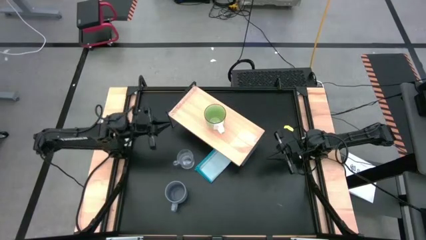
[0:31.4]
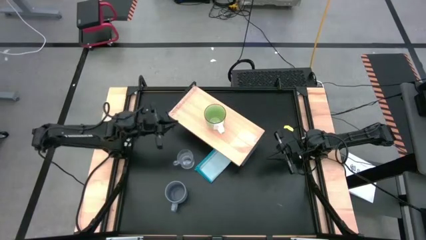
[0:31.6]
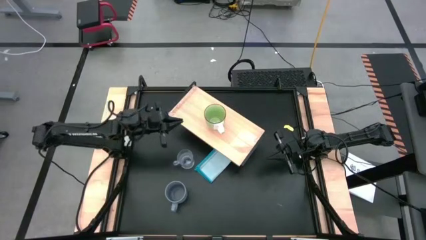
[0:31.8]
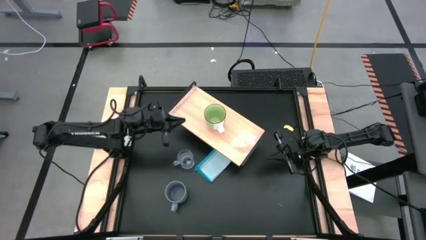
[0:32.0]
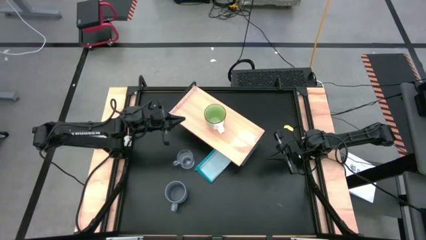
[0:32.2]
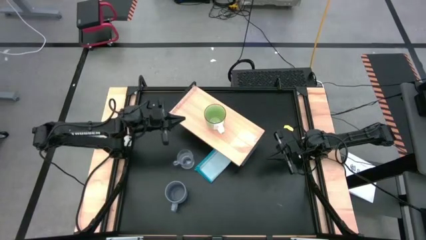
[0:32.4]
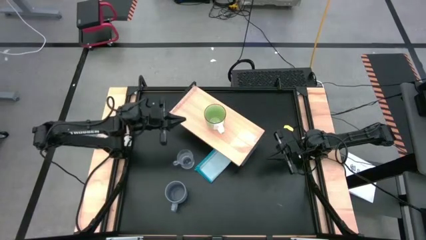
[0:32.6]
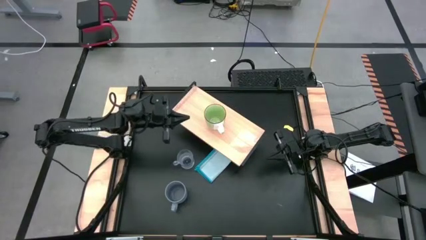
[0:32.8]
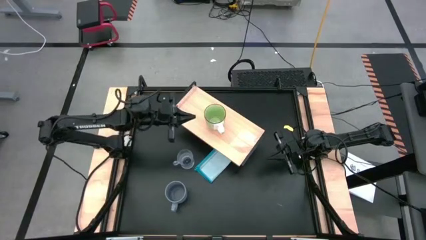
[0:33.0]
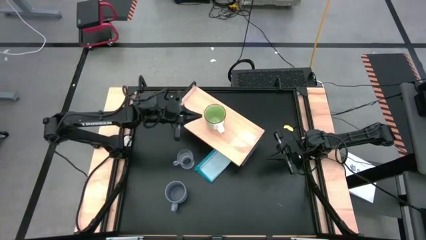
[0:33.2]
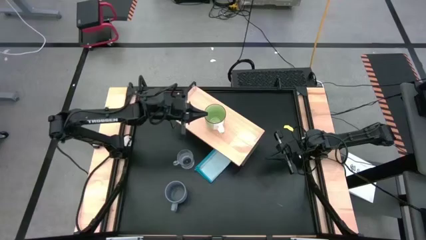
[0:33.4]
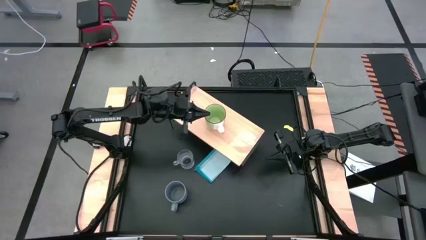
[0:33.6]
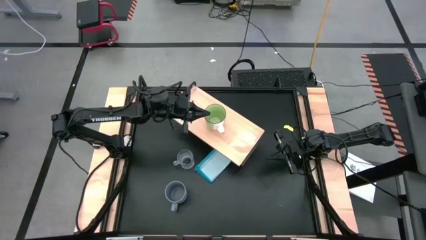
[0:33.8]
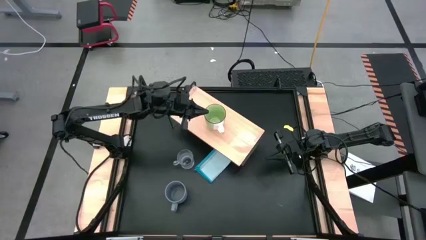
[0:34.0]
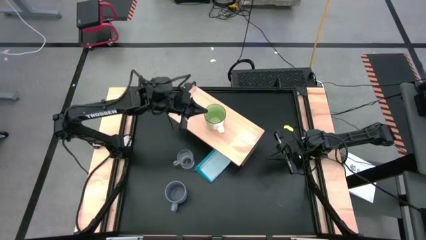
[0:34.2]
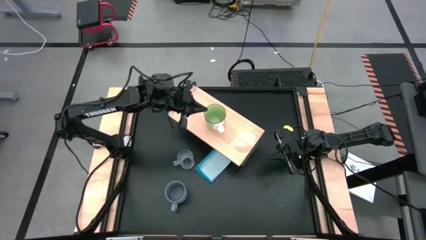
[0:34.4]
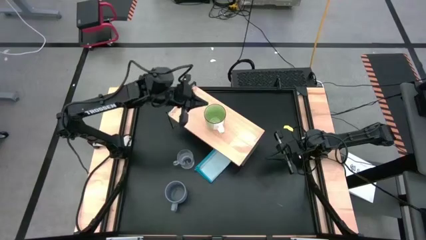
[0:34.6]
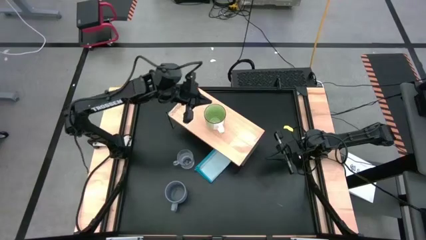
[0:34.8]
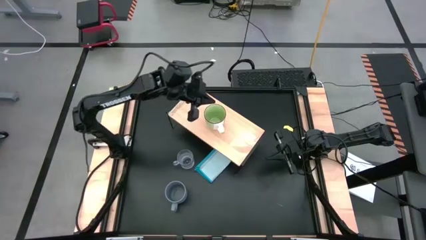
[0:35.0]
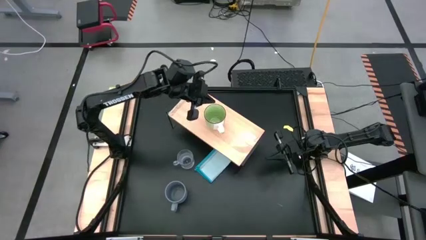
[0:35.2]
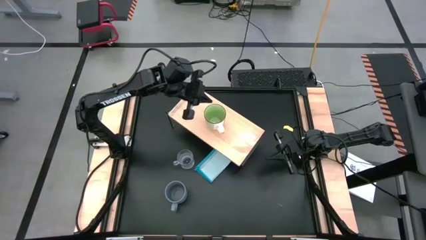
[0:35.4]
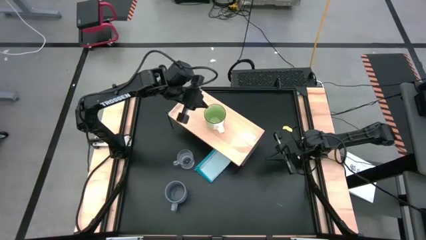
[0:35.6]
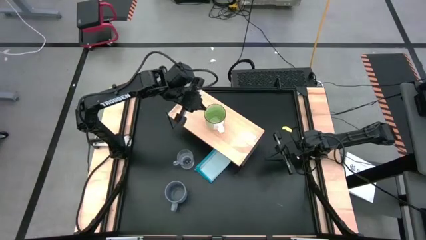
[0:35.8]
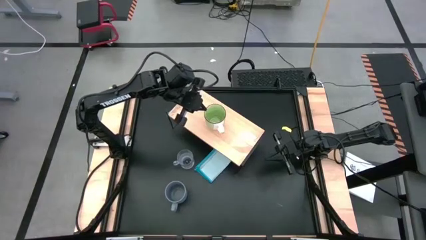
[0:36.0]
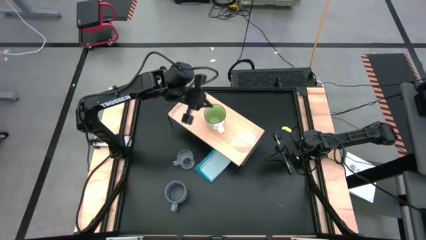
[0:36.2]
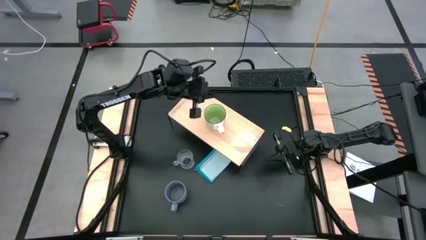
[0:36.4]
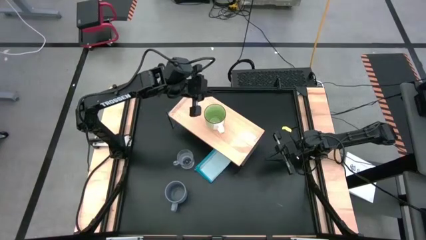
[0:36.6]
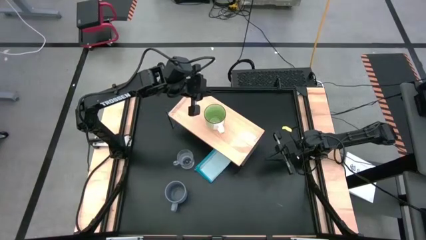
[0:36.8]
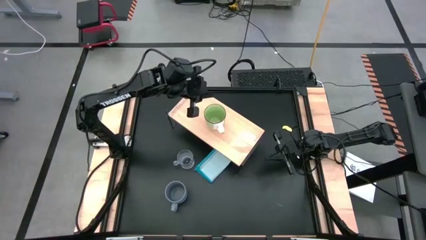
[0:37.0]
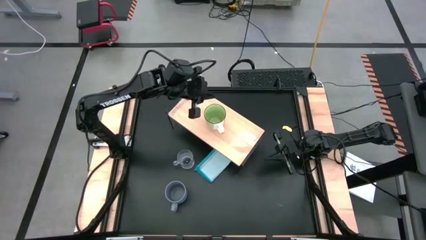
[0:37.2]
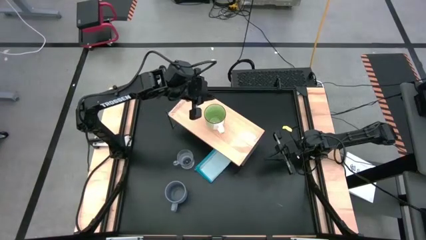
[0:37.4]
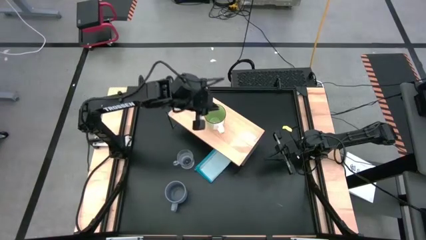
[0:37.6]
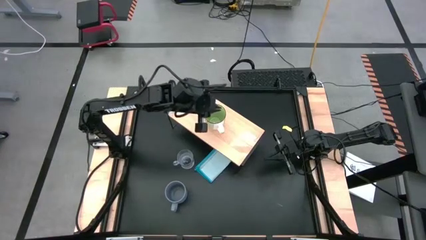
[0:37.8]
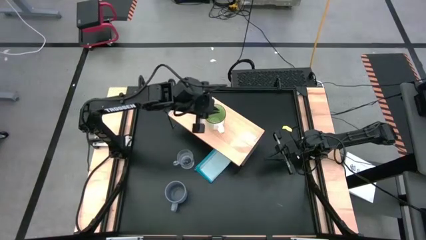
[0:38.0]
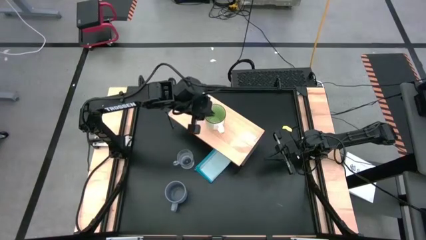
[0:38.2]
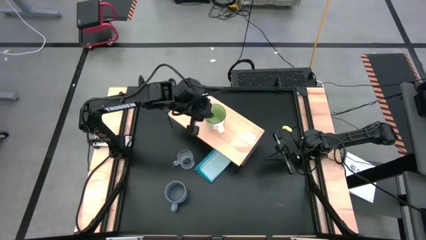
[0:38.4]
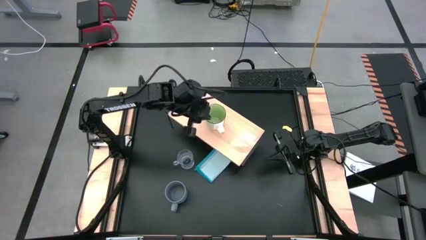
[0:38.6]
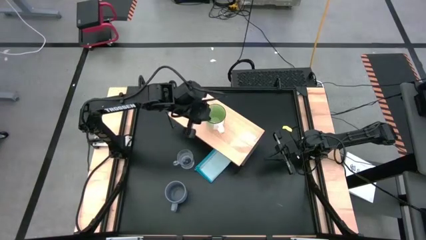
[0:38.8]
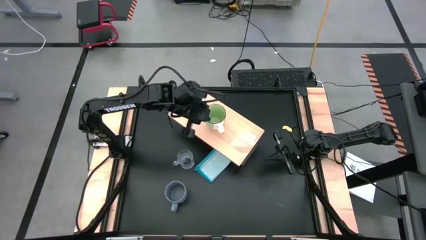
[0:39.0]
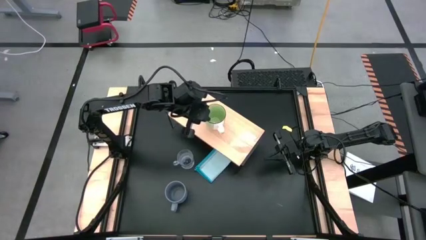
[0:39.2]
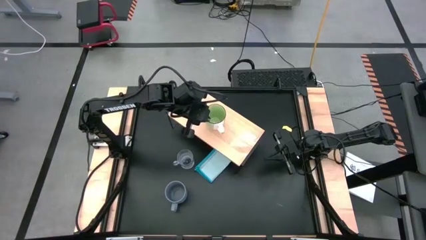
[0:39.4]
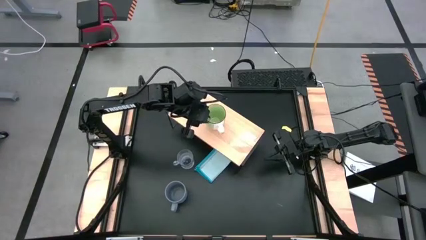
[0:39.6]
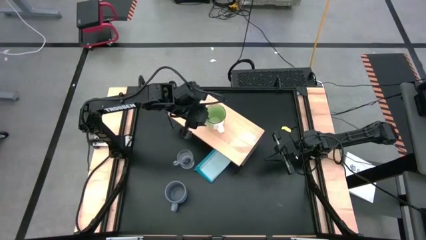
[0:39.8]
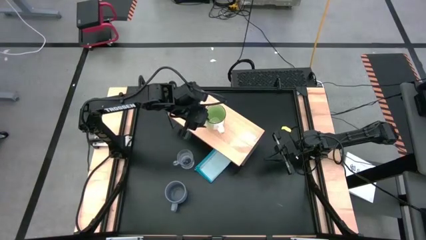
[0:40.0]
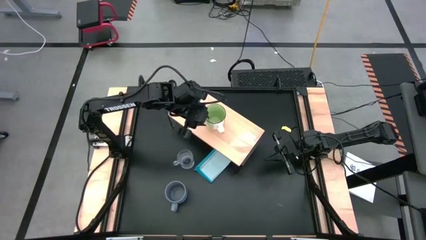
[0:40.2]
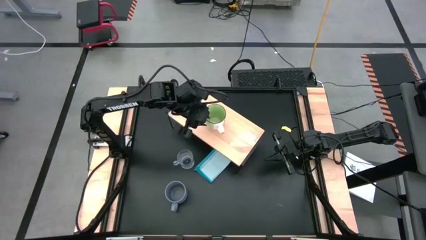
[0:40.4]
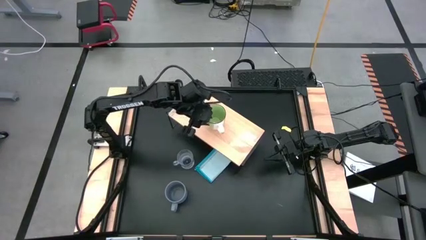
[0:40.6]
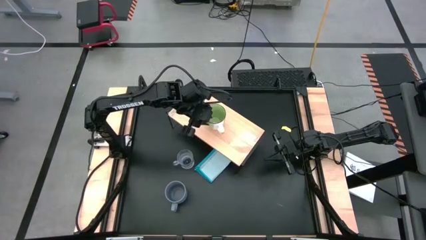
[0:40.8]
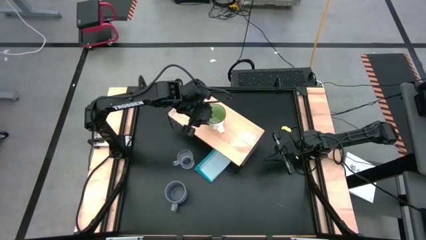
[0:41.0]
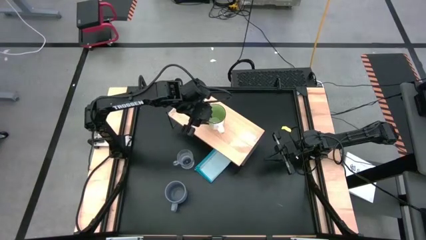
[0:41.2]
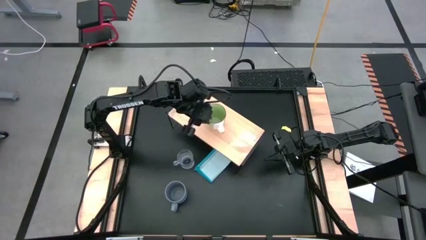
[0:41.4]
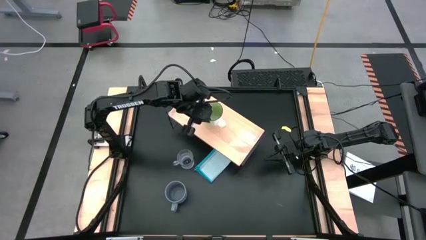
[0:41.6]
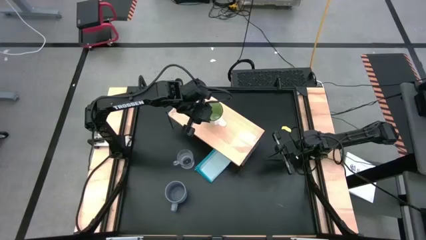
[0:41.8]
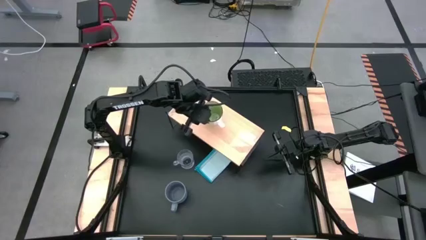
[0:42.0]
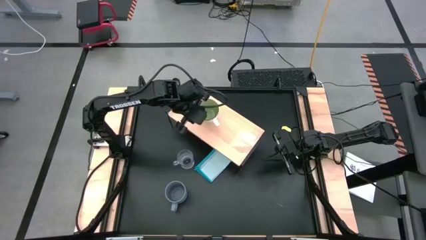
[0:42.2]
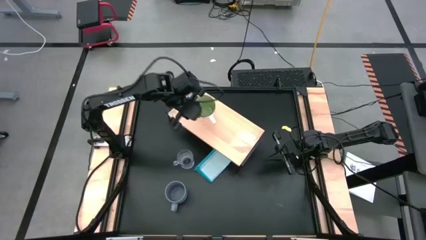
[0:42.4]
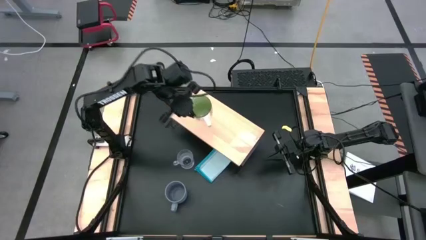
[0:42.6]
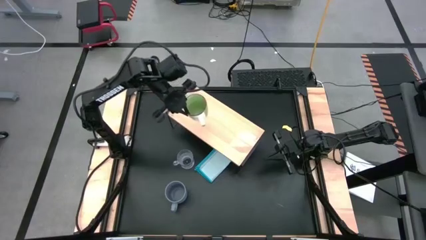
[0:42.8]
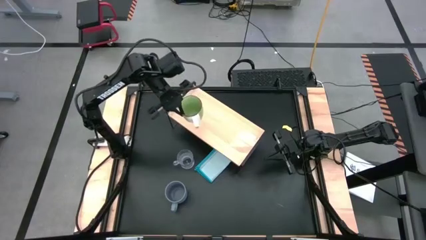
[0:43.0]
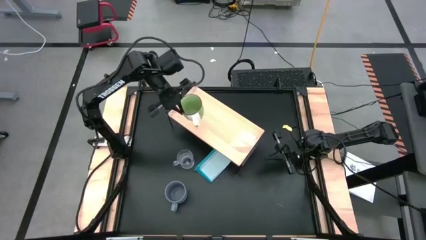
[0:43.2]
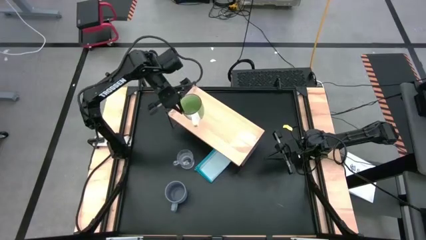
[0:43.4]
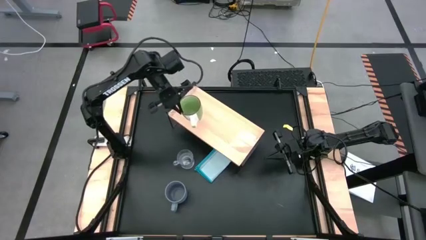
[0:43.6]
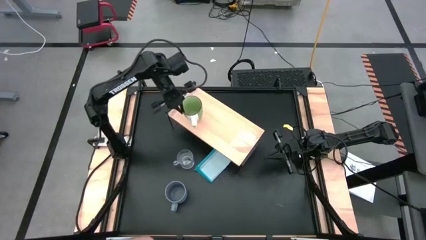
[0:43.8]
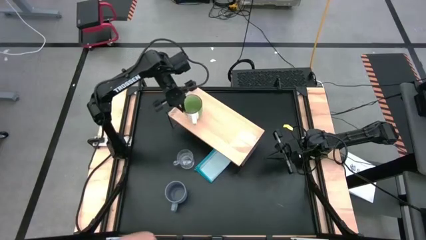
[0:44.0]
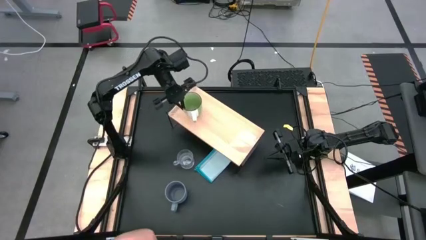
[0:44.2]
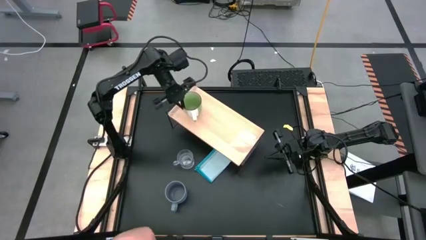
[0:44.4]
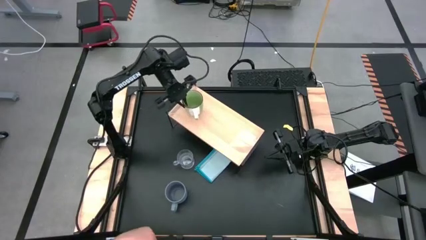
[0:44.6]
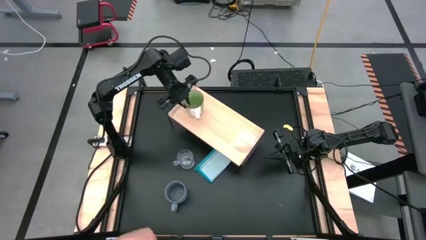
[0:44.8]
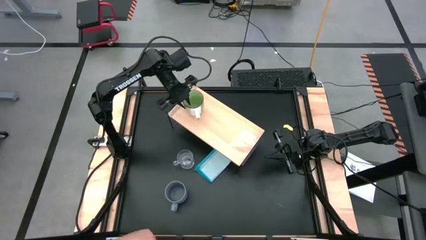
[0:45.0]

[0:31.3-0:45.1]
Task: Stack small to large cups/mugs on shelf
Put the green mug on the shelf

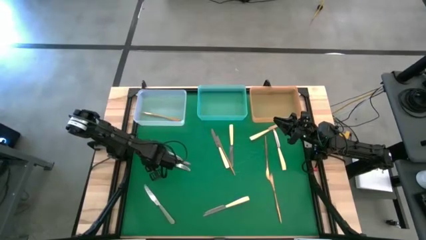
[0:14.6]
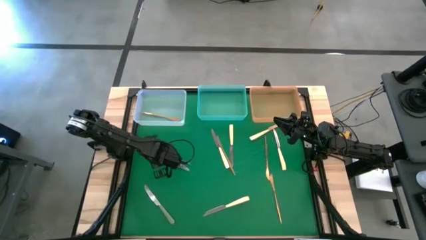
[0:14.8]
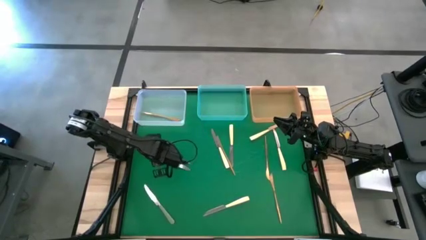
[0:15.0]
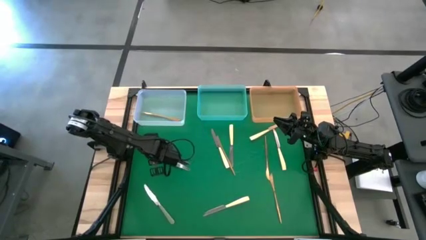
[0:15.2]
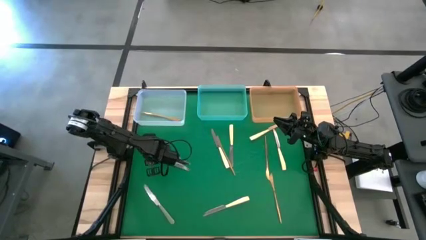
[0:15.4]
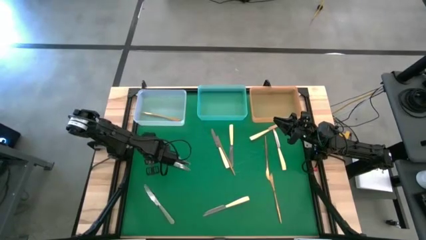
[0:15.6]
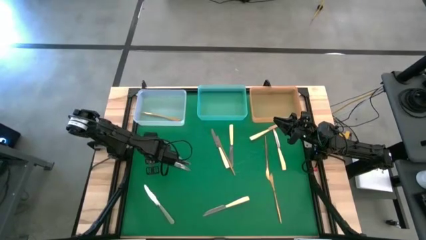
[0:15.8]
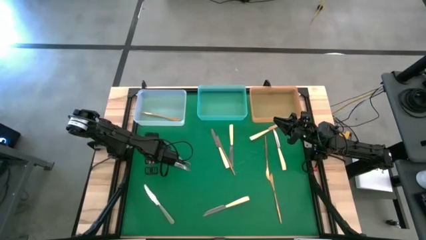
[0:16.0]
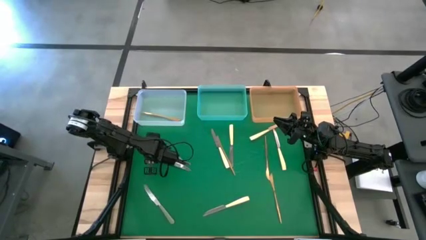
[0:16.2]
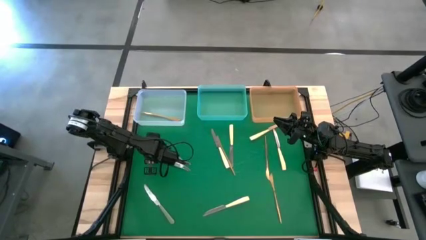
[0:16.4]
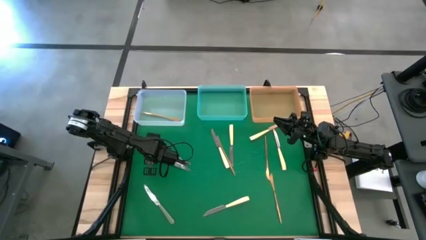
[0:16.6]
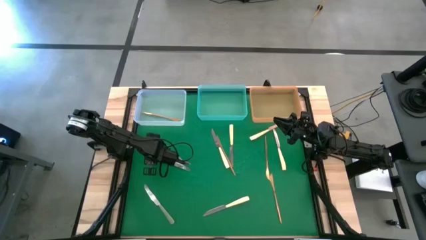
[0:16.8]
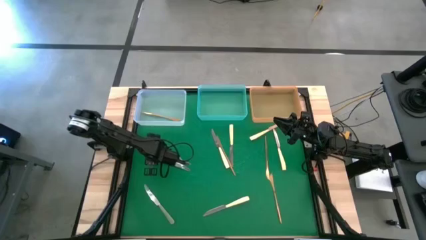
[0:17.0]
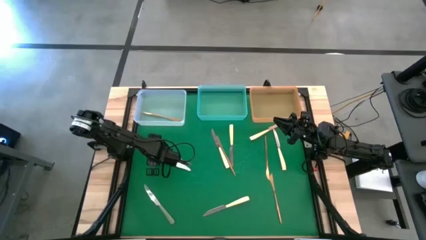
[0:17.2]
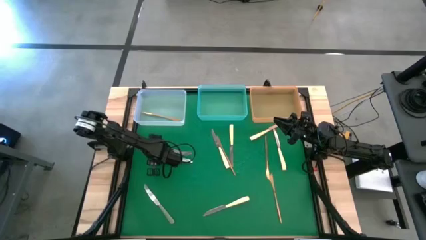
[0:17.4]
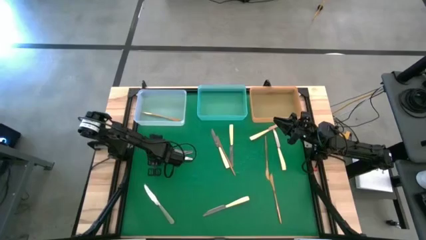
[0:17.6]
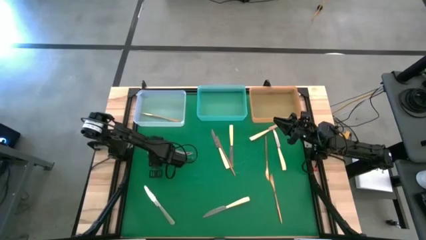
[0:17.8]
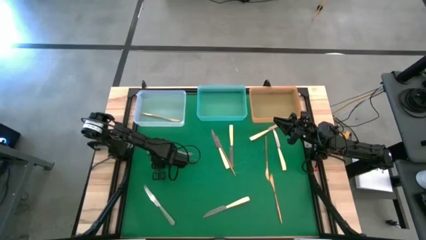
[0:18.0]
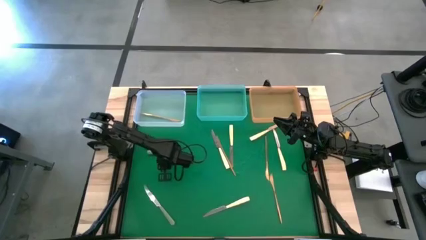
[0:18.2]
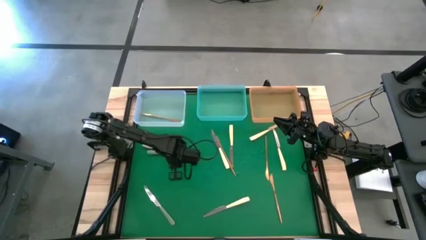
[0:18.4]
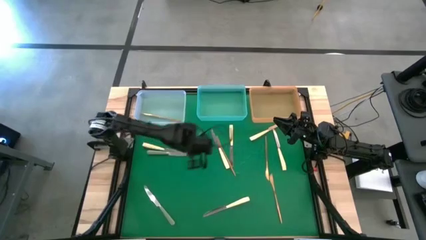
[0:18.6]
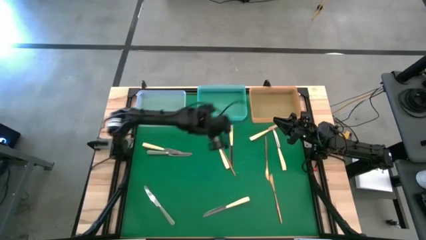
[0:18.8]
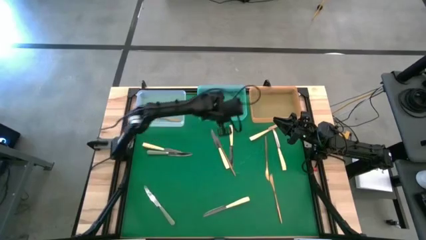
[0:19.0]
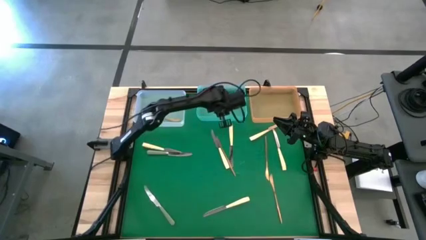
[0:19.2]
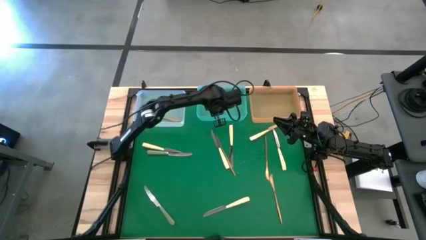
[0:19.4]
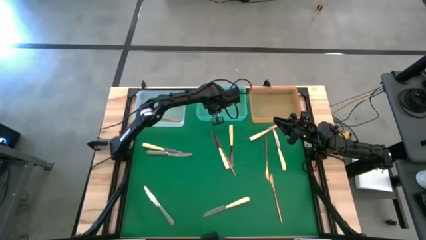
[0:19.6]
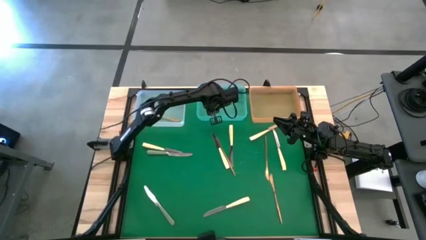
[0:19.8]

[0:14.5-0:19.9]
Task: Sort silverware by color (type)
Put the green table knife into the blue bin
